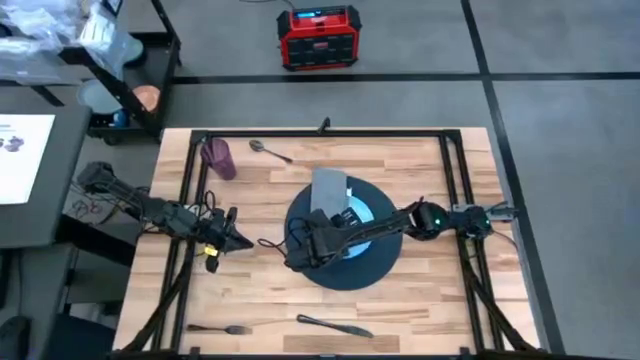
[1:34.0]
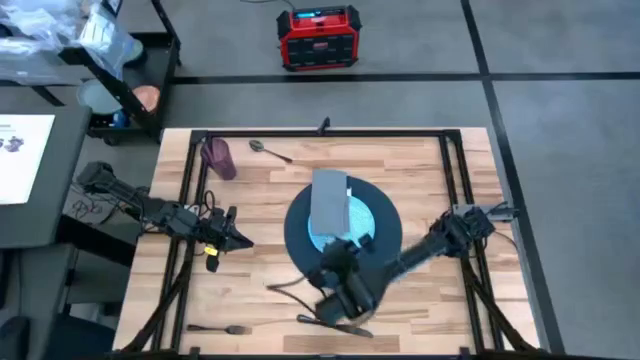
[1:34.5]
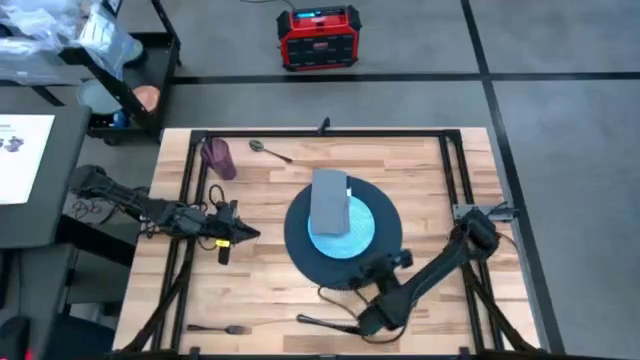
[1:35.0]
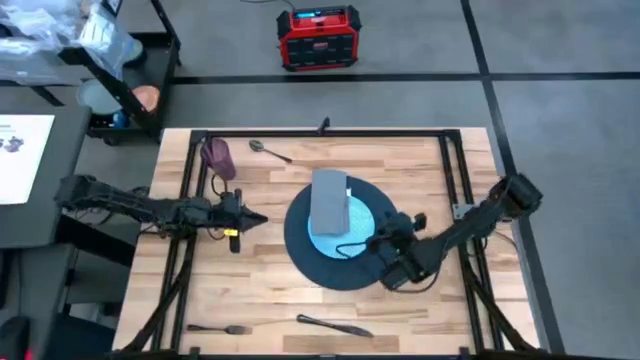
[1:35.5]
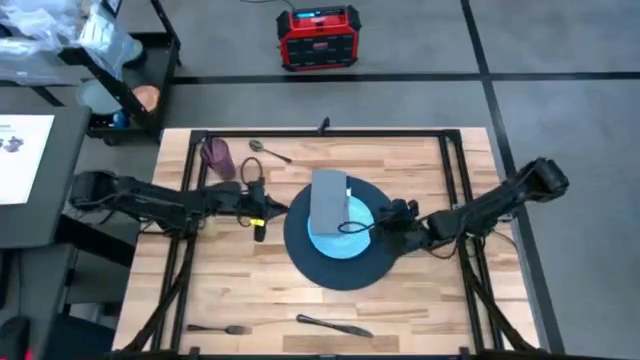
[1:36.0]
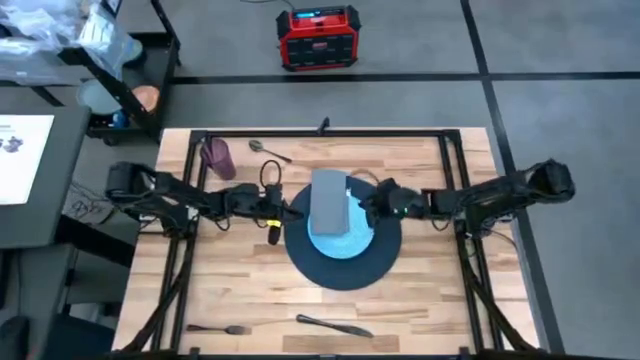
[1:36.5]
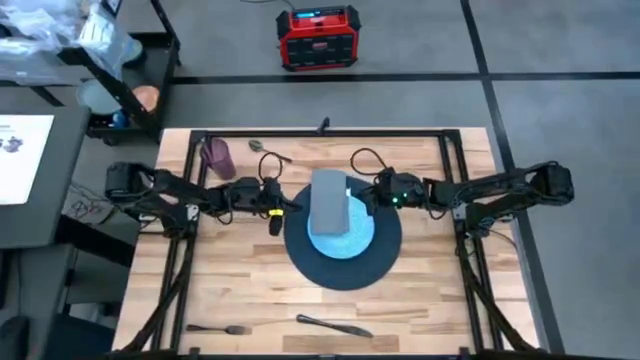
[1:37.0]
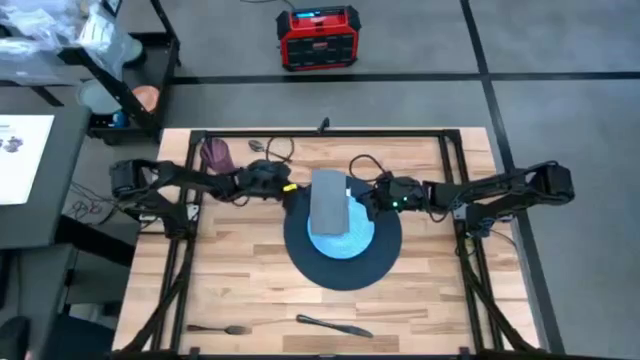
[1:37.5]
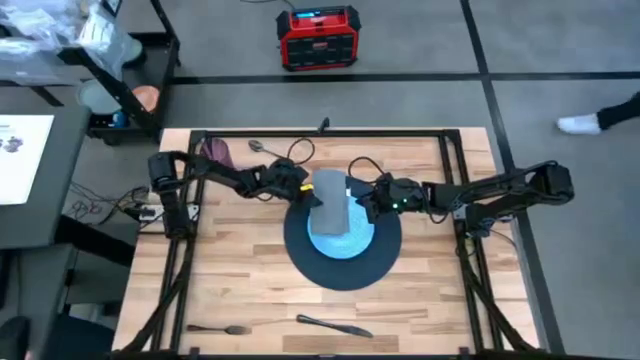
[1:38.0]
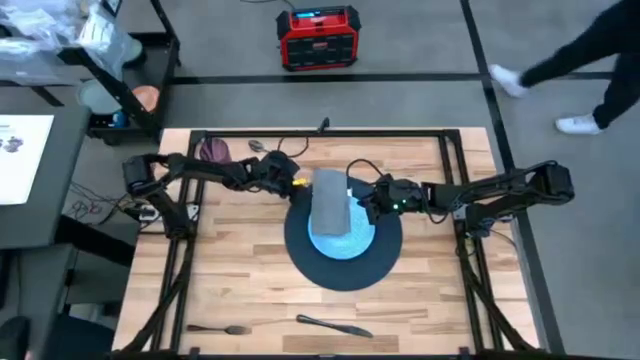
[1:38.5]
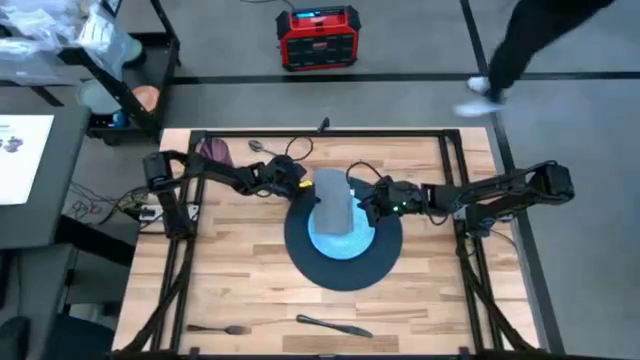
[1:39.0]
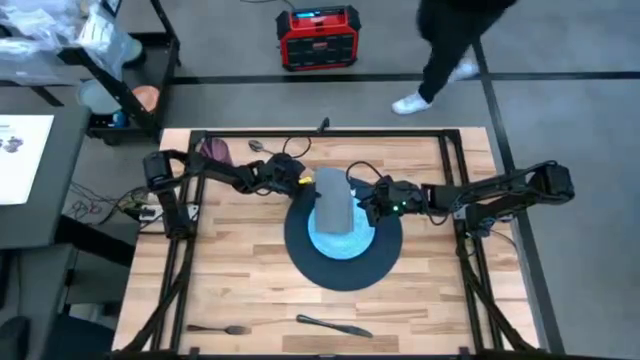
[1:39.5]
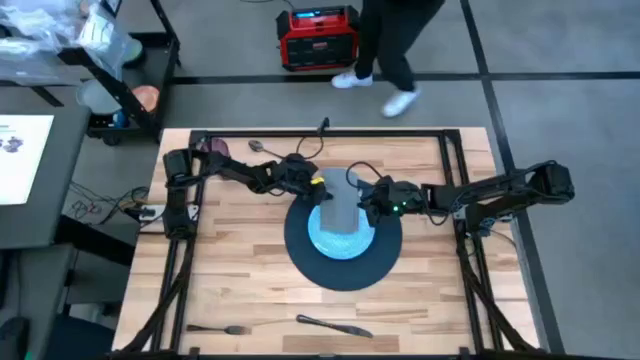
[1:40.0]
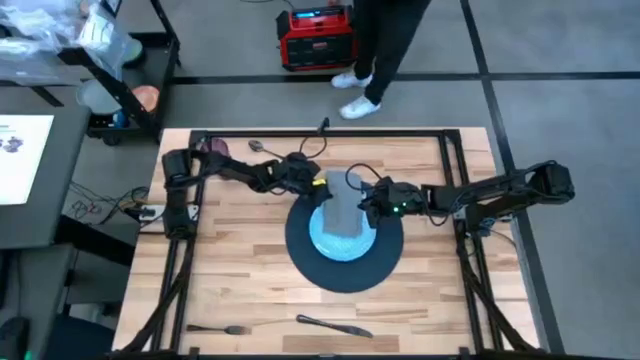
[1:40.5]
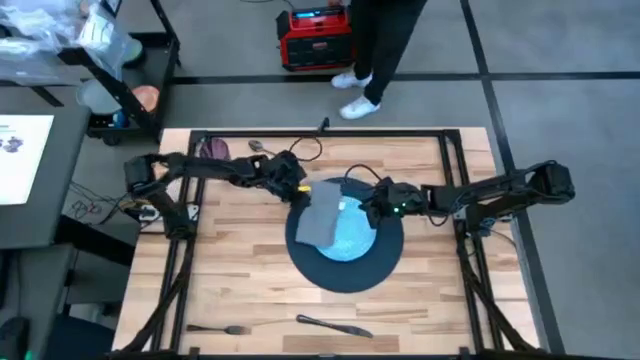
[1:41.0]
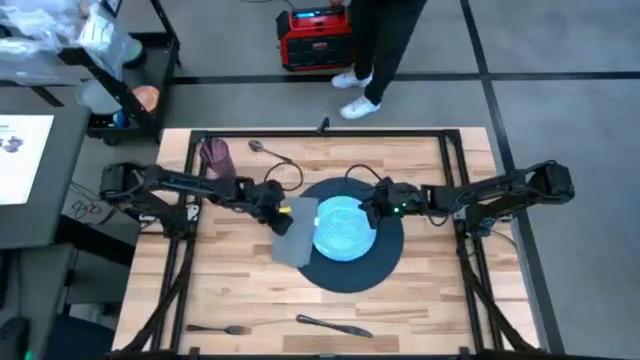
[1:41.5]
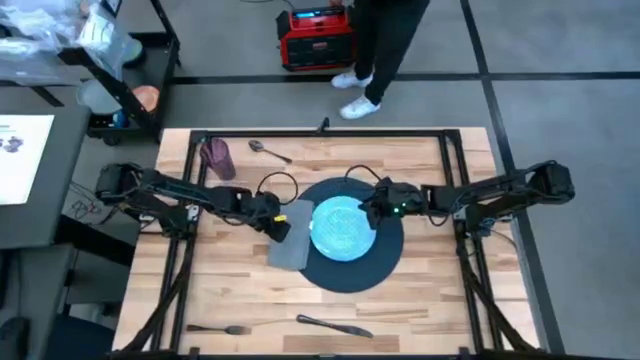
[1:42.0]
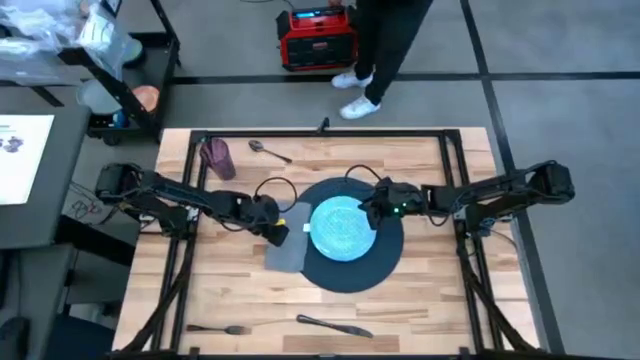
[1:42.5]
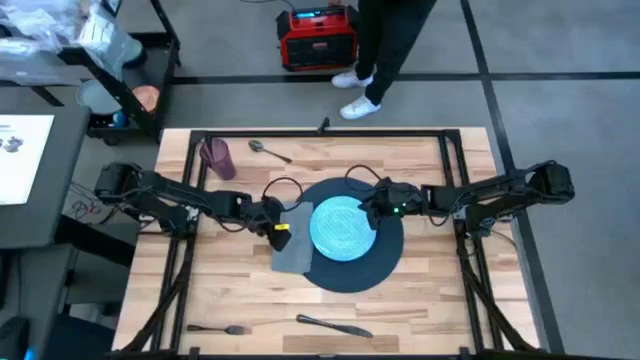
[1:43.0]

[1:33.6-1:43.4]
Task: Set table place
Move the gray napkin to the middle left of the table

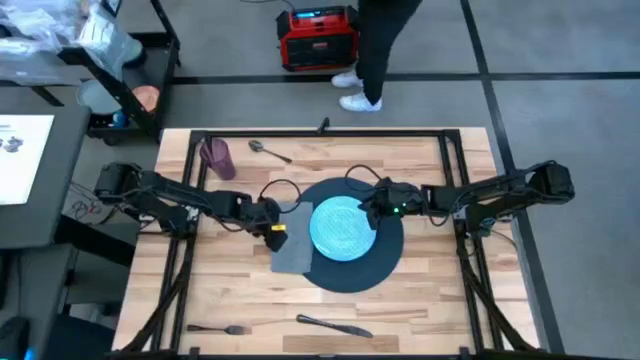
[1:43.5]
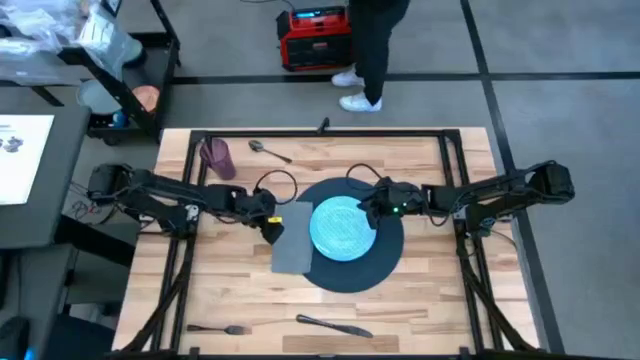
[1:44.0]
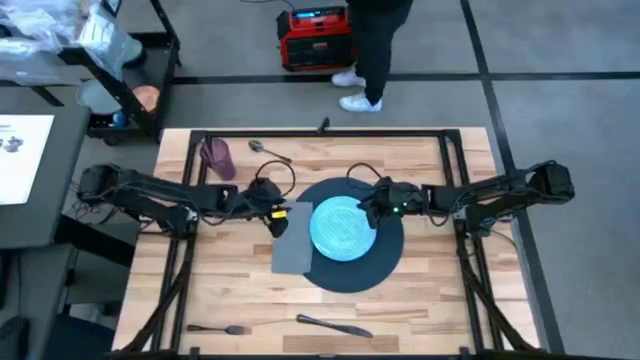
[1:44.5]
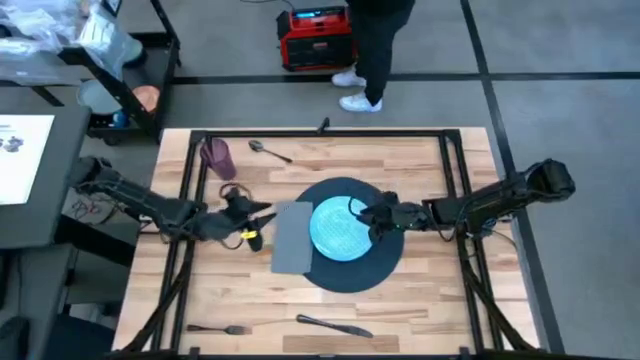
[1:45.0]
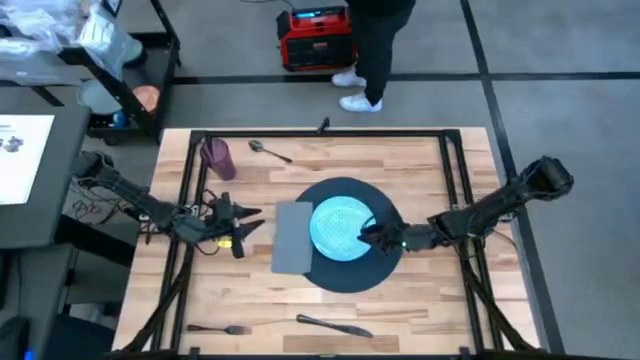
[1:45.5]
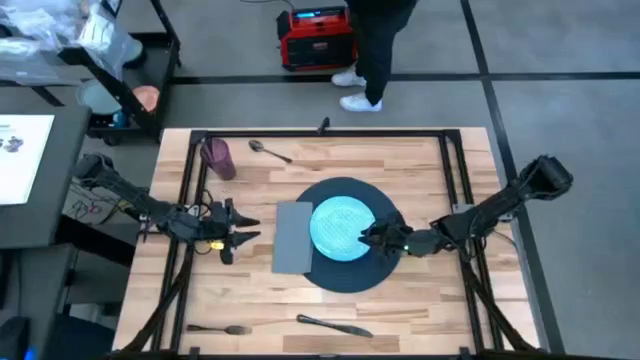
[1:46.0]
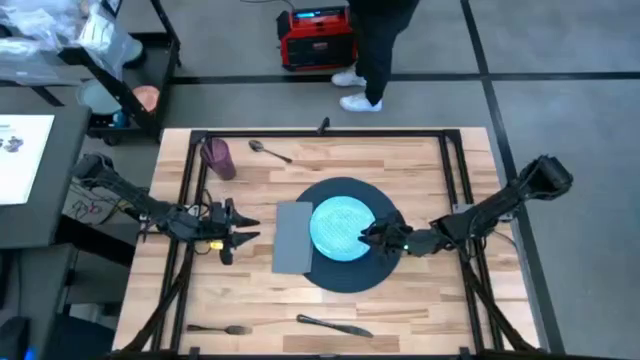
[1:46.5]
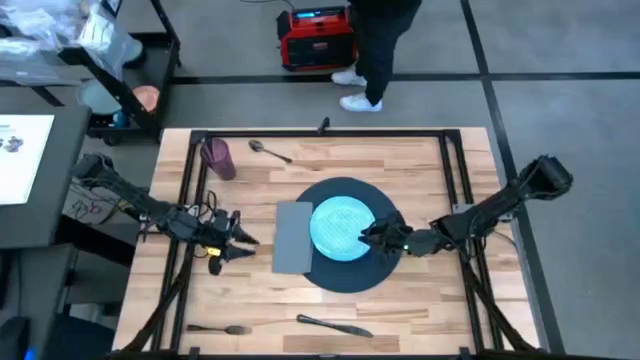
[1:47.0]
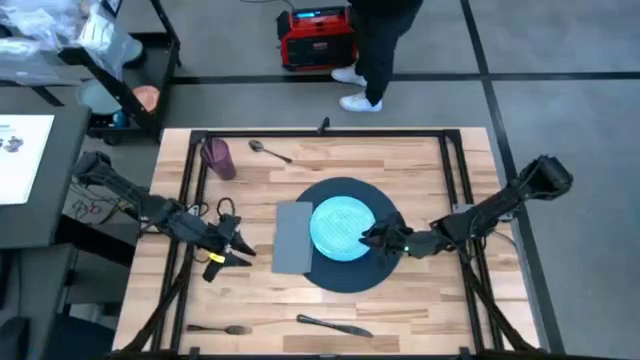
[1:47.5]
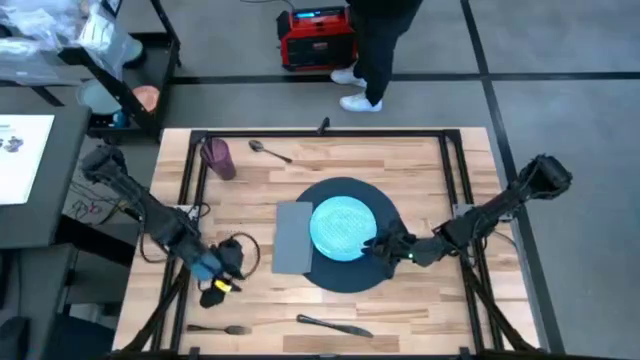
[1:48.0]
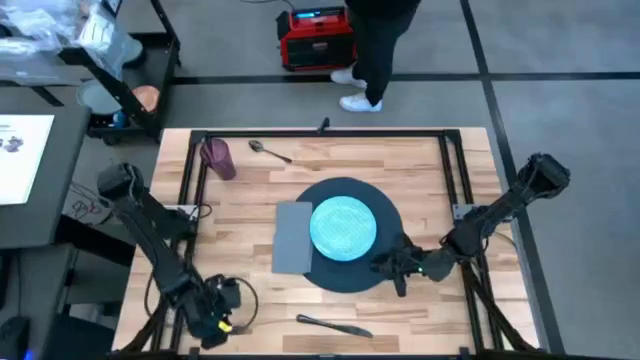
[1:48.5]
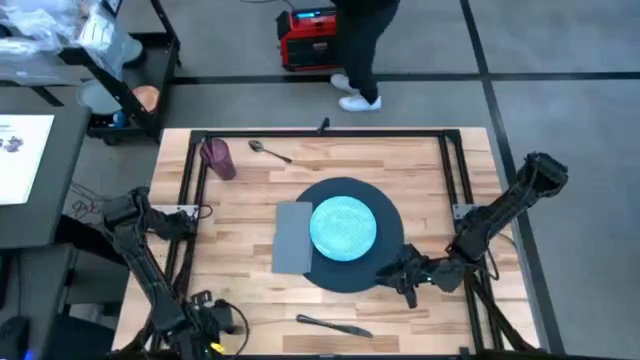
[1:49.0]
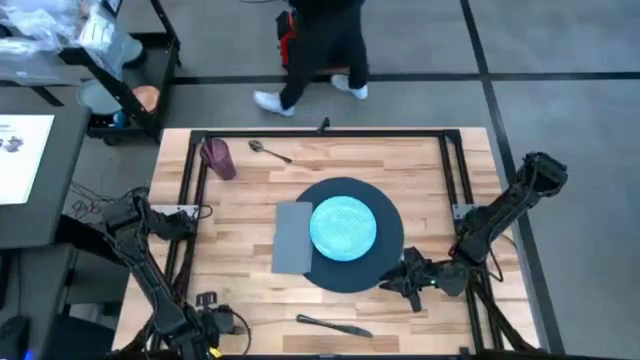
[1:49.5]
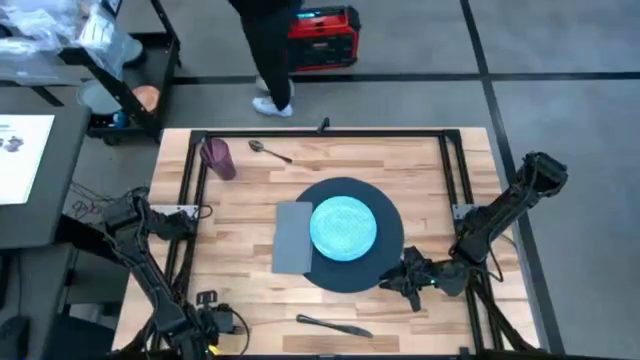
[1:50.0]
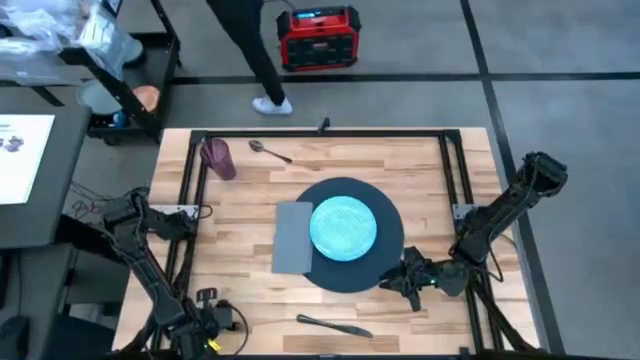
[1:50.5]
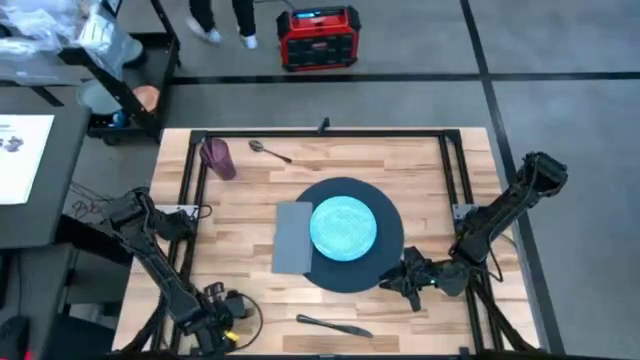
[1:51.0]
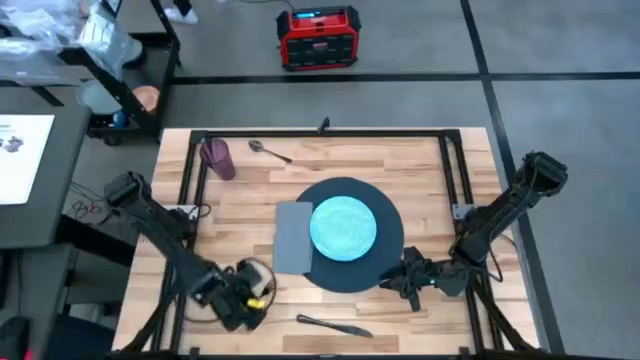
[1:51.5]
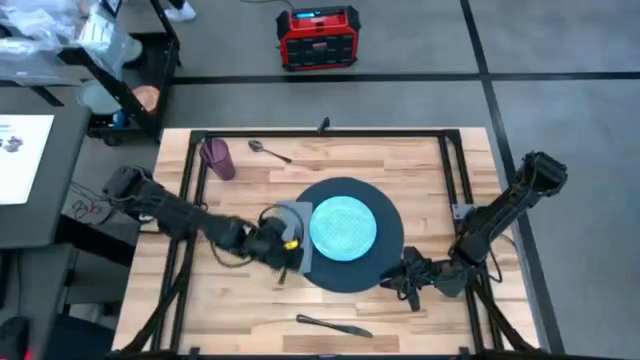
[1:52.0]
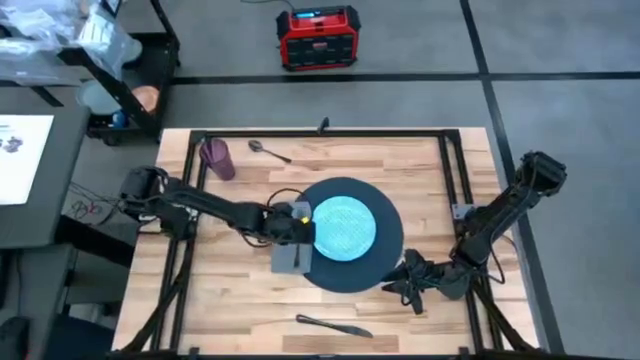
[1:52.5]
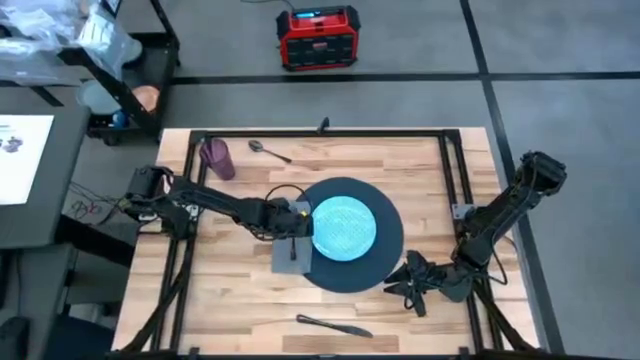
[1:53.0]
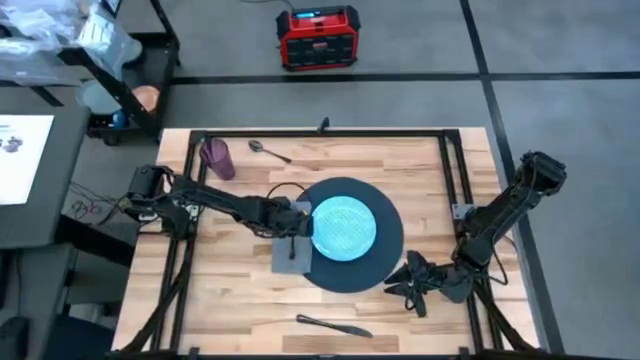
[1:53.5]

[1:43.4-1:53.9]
Put the black fork on the gray napkin
